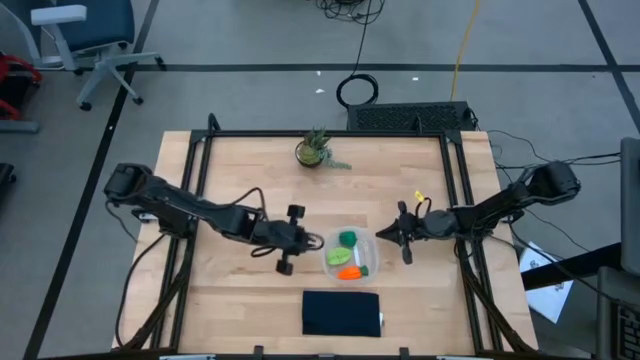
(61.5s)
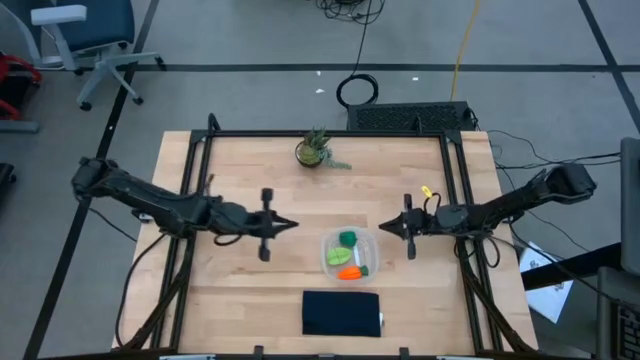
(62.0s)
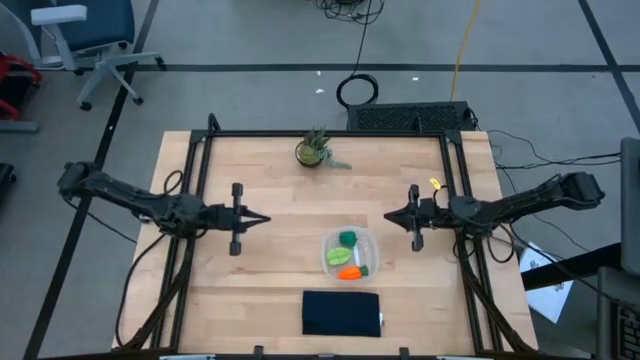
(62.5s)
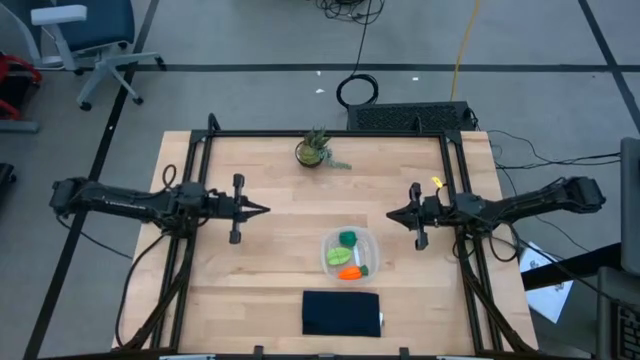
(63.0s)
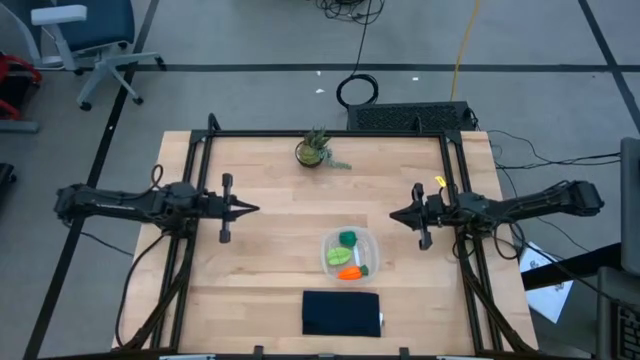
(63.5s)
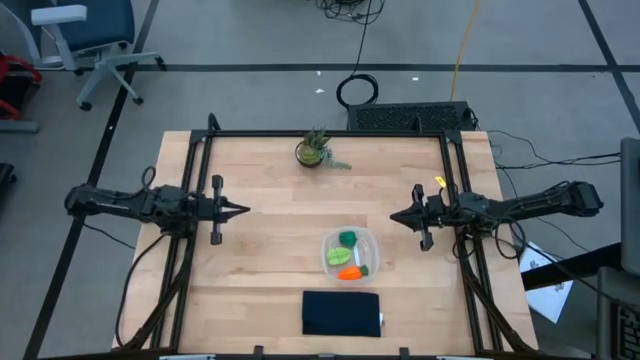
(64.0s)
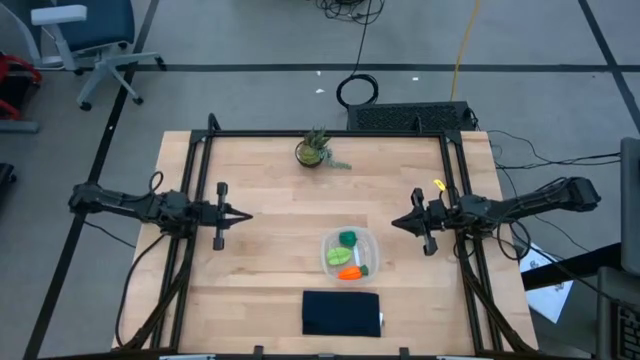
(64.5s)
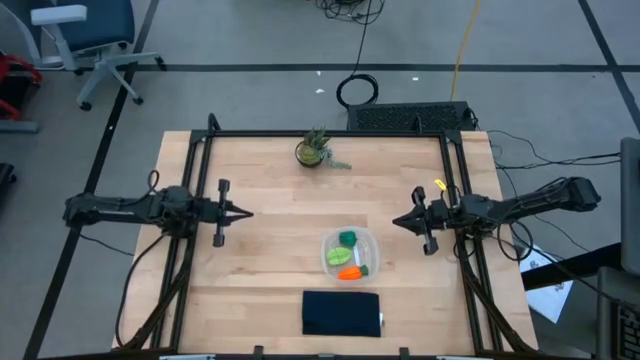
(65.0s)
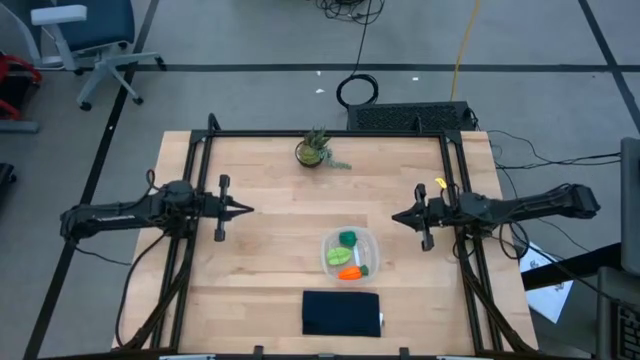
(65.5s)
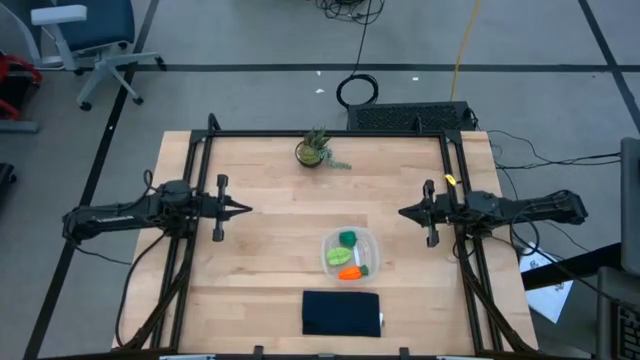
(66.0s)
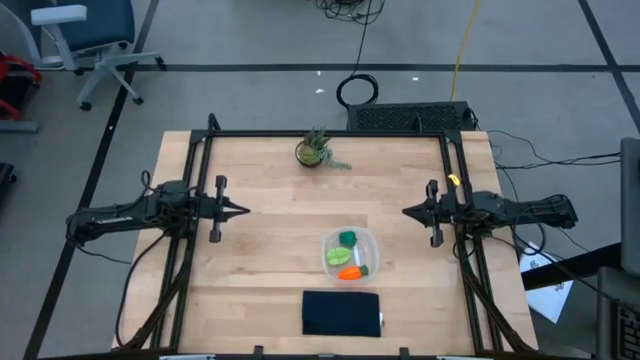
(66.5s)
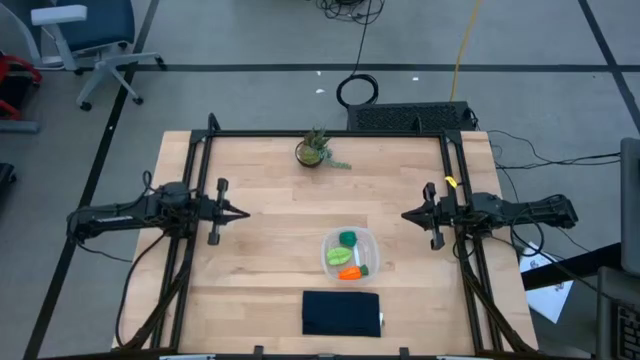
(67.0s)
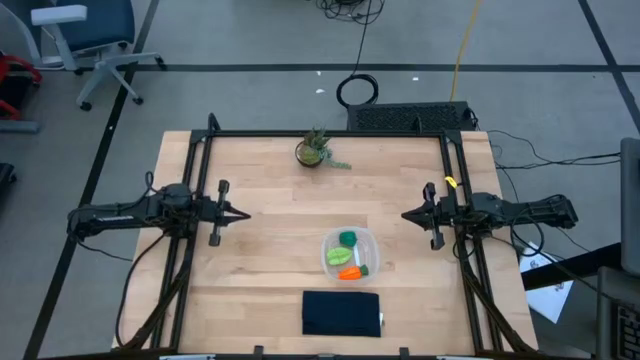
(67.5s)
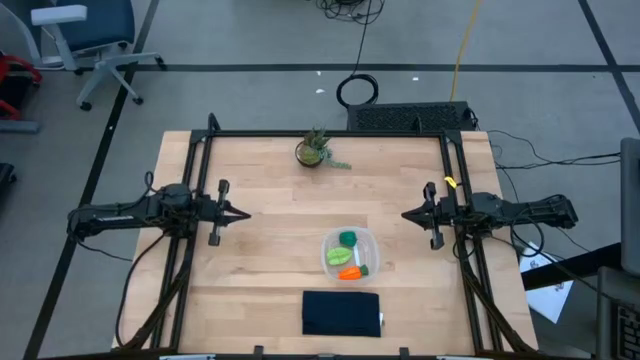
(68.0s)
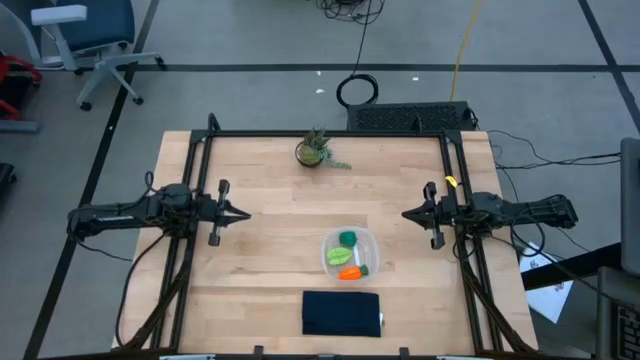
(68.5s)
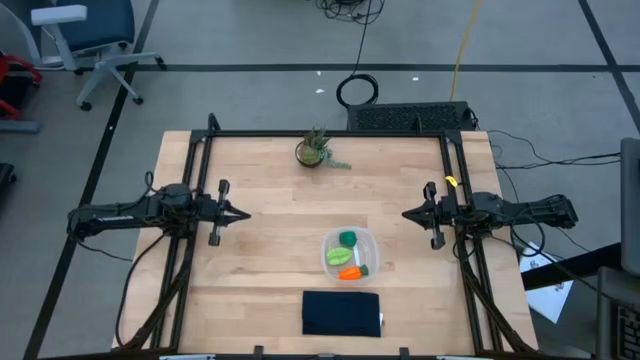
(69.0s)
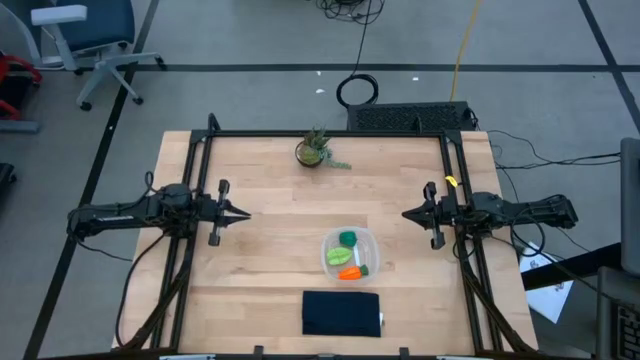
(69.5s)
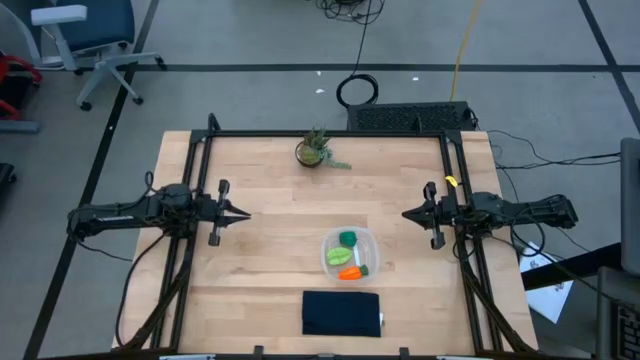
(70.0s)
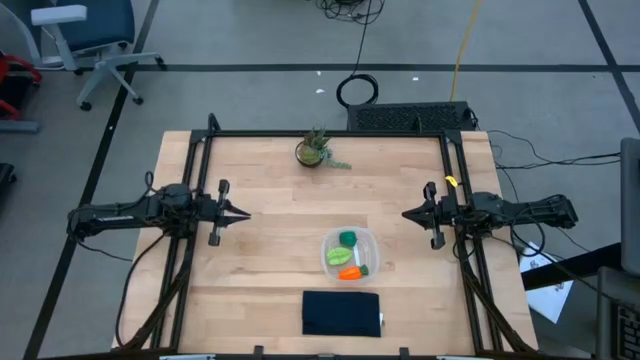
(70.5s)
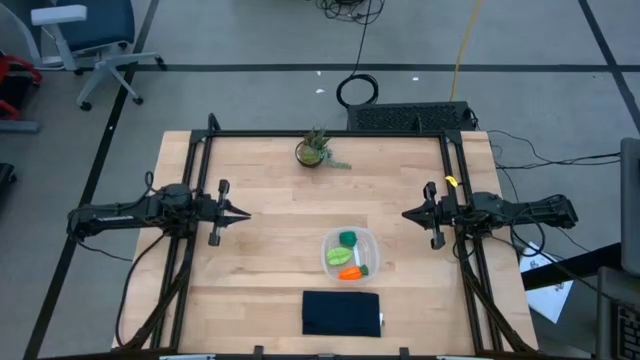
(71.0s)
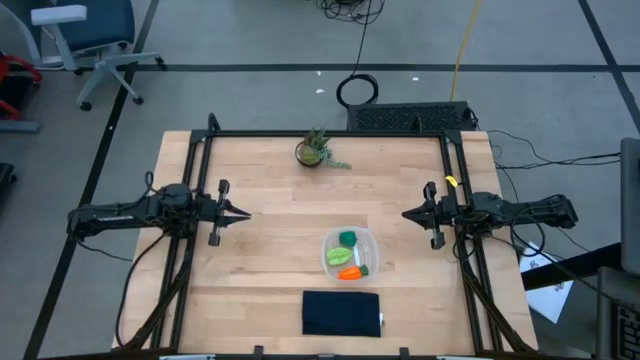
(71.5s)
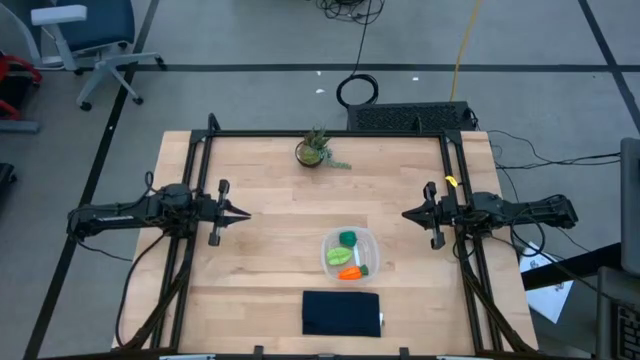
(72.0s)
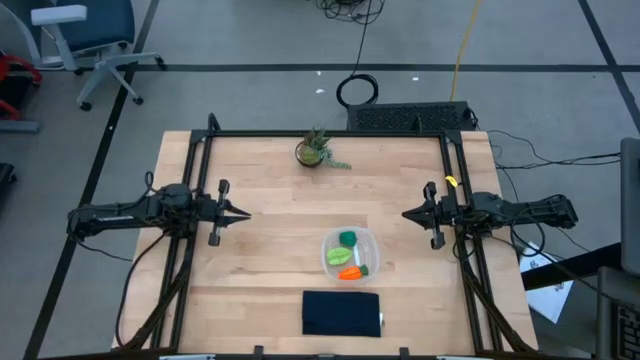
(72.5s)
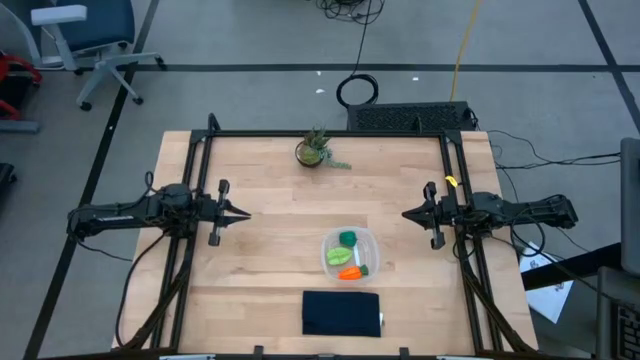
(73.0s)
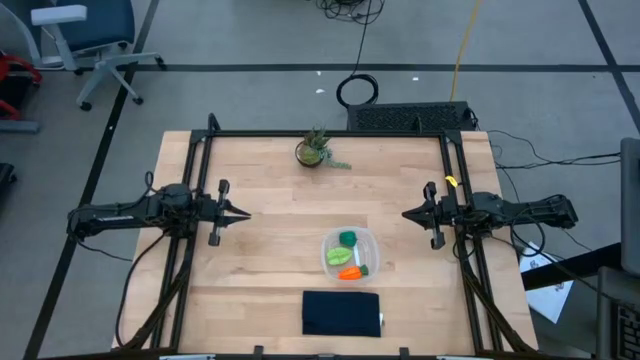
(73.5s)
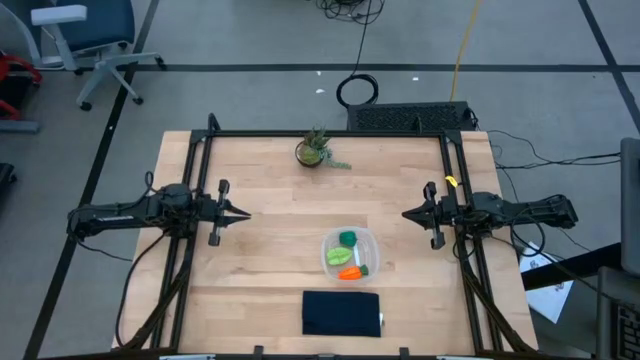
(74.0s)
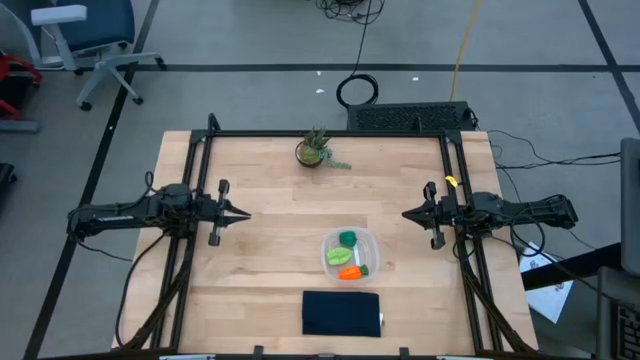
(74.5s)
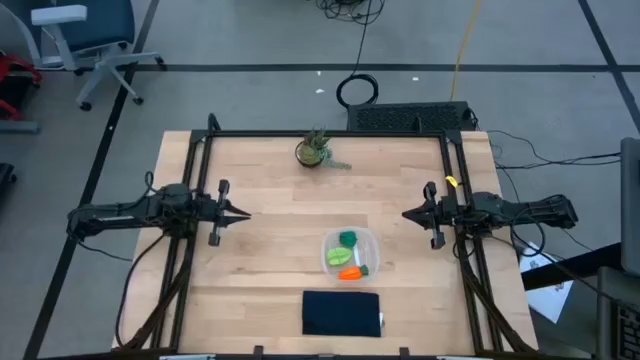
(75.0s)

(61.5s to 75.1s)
Task: Pick and placing Produce into tupperware
Return to Home Position

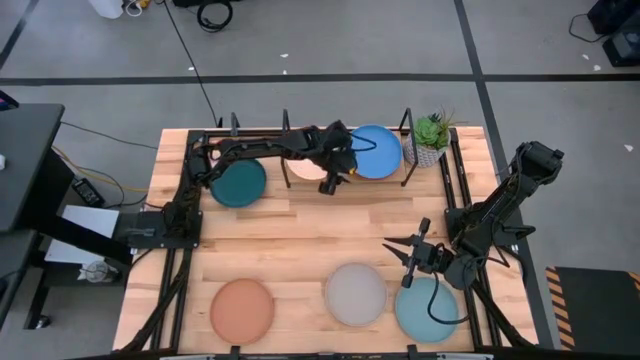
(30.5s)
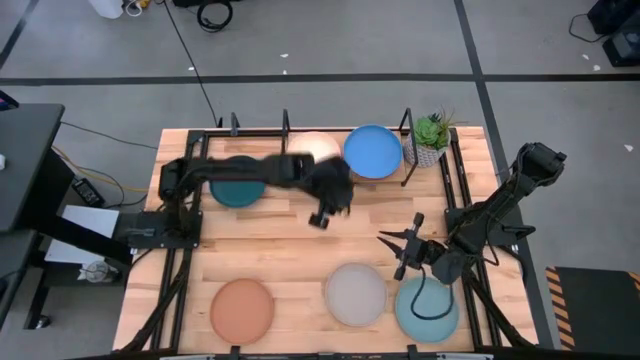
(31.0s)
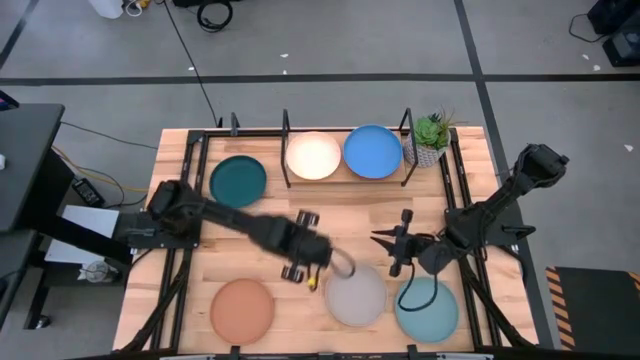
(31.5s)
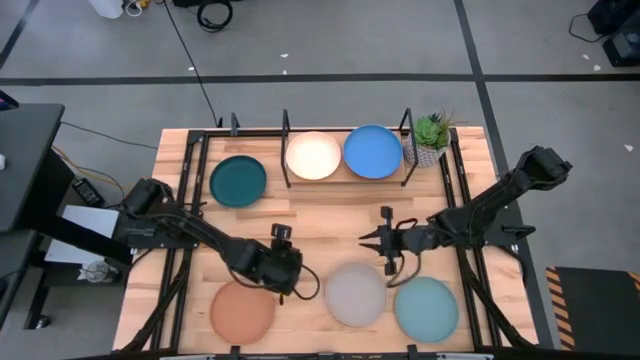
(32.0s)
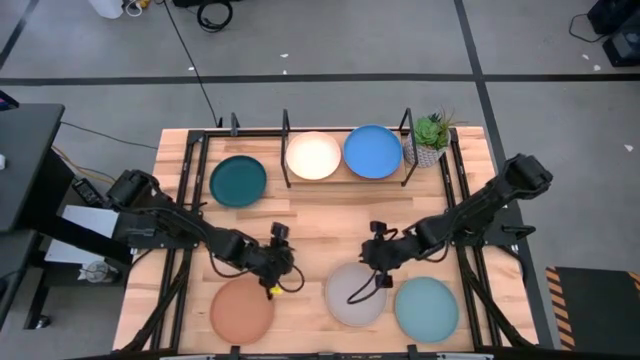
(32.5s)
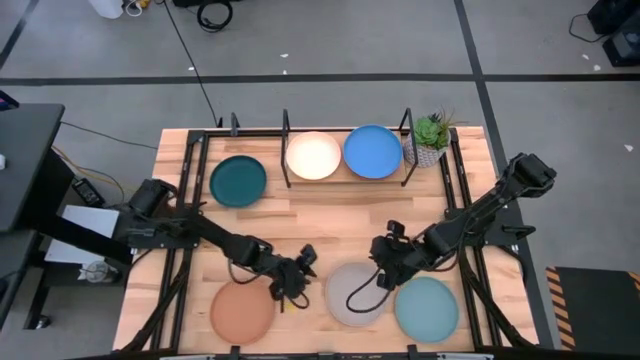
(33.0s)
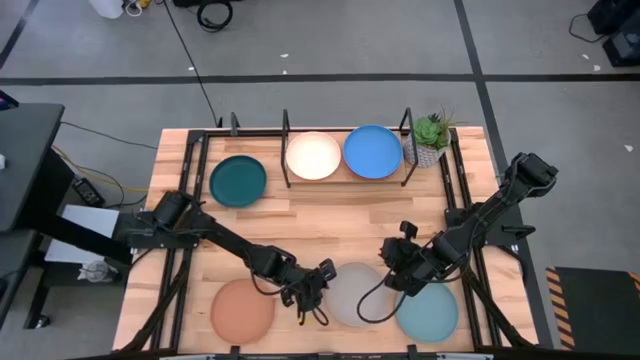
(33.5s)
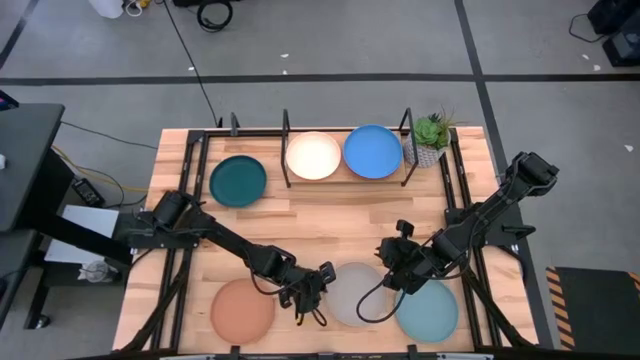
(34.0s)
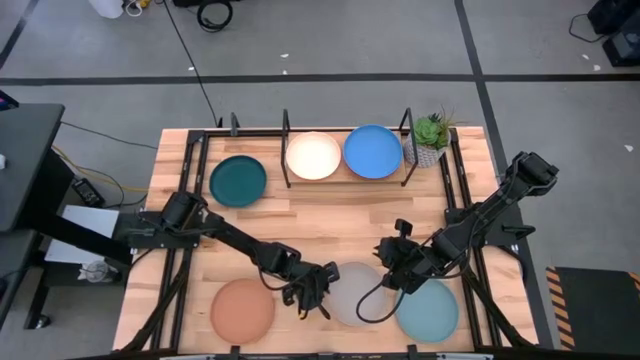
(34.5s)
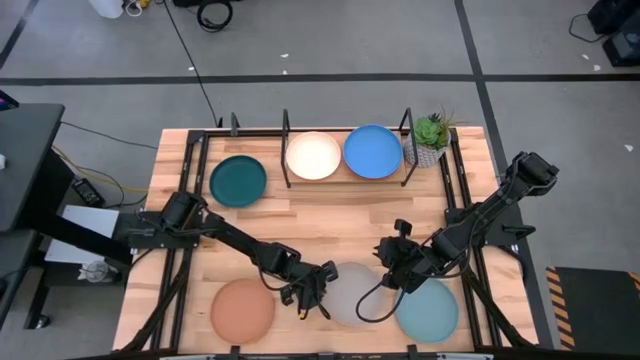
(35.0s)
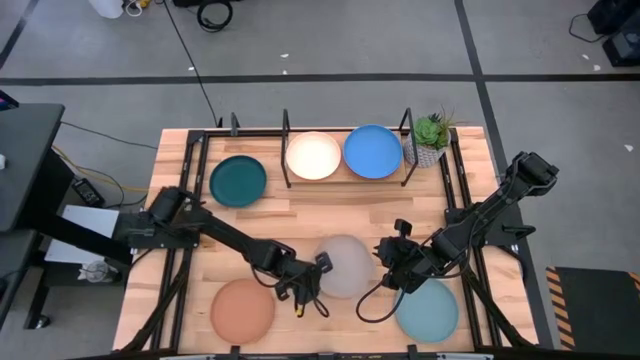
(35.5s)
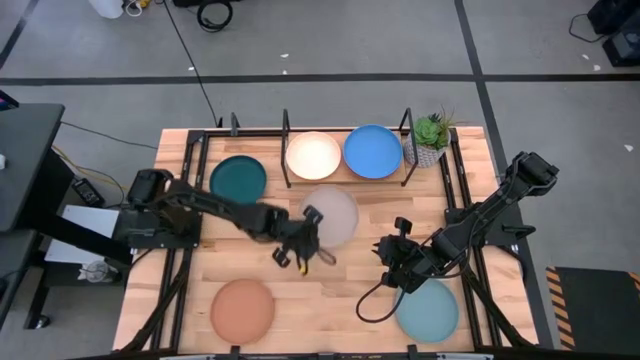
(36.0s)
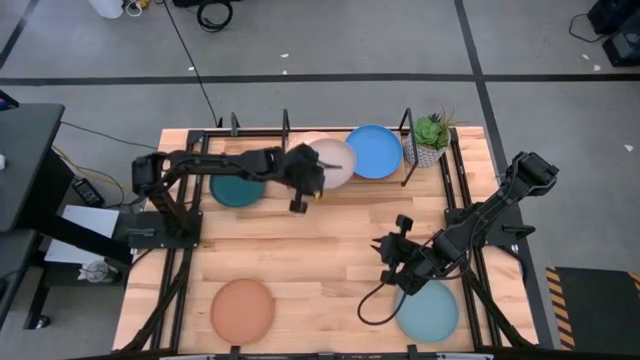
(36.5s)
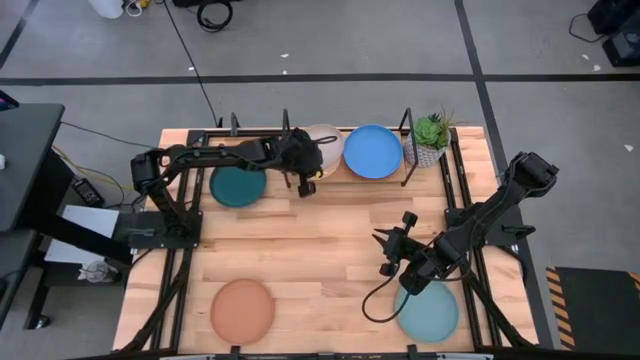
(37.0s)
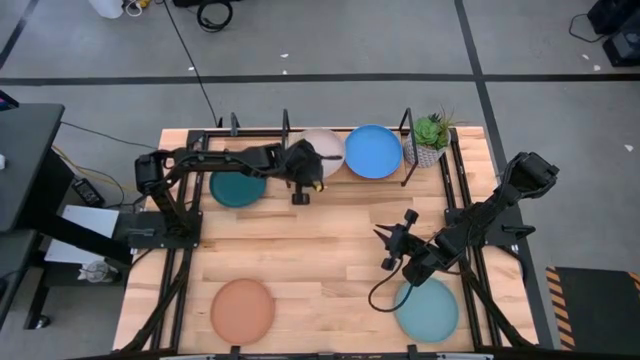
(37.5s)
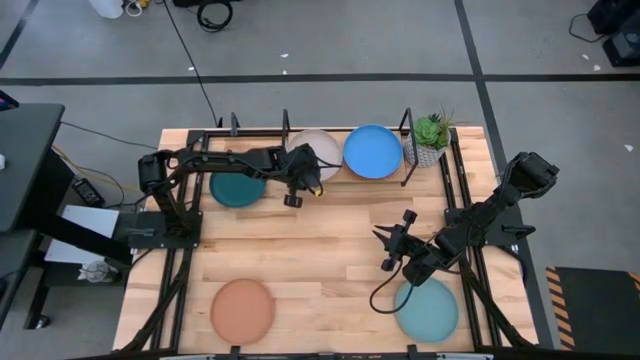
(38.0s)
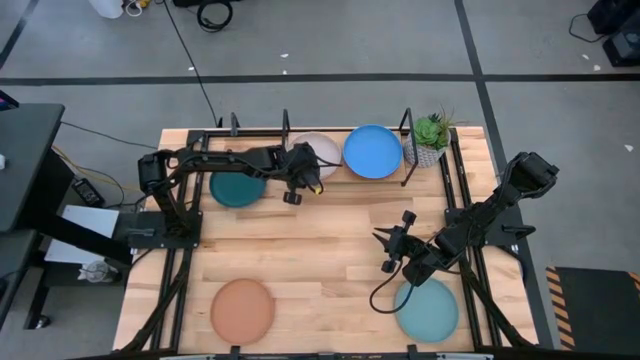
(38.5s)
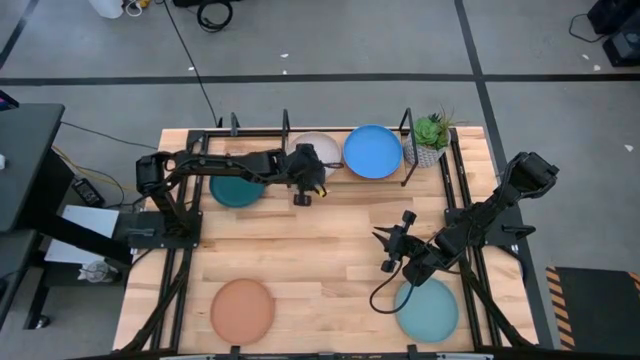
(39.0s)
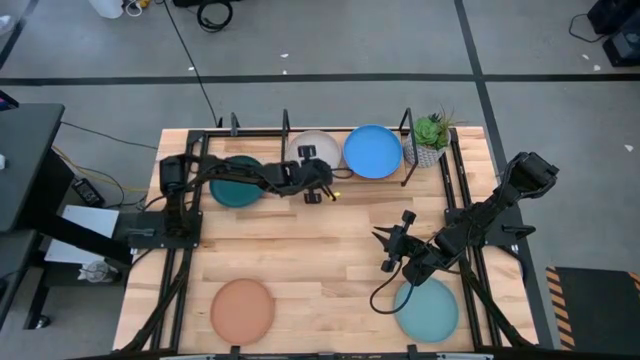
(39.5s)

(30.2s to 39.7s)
Task: Place and stack plates onto a shelf
Stack the gray plate on the white plate on the shelf
